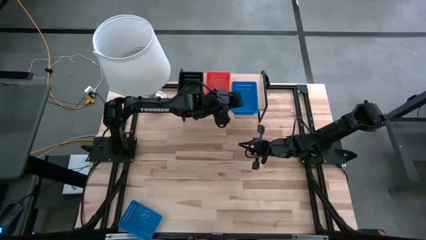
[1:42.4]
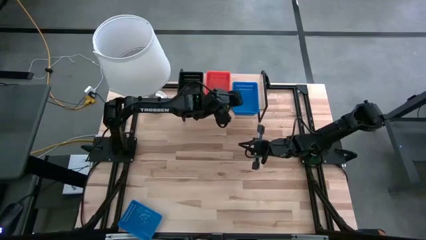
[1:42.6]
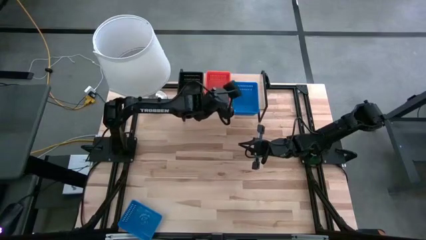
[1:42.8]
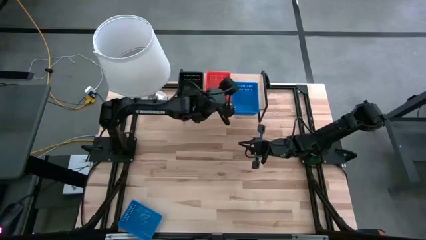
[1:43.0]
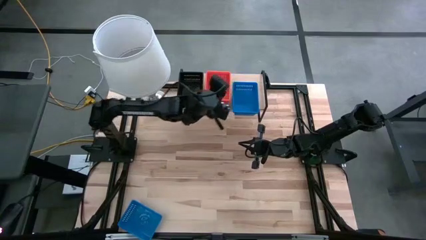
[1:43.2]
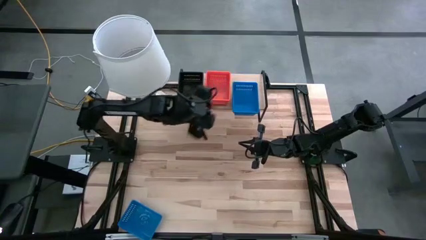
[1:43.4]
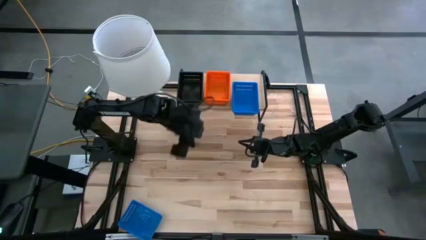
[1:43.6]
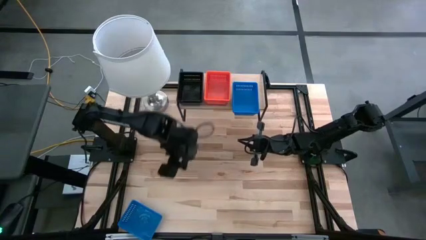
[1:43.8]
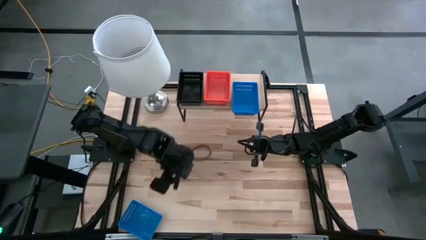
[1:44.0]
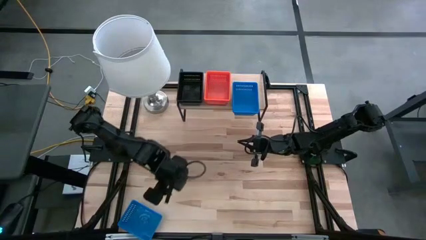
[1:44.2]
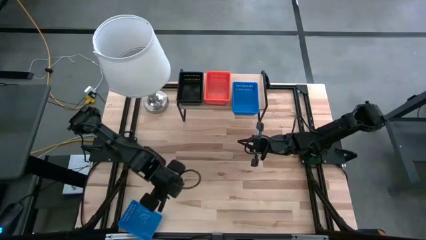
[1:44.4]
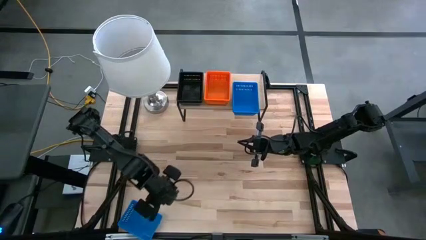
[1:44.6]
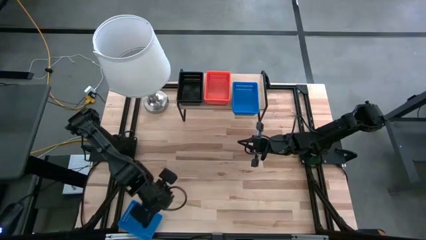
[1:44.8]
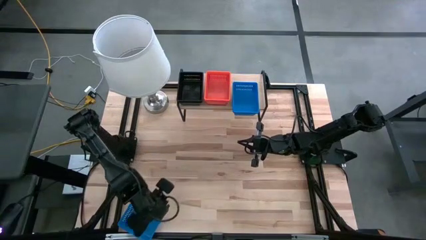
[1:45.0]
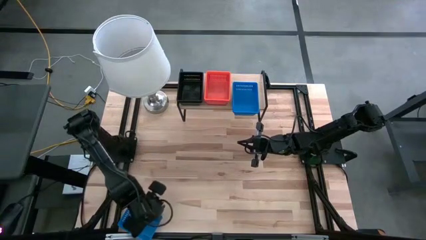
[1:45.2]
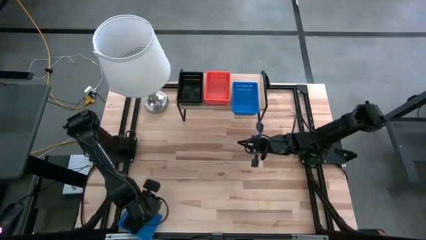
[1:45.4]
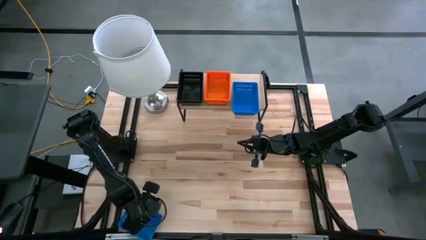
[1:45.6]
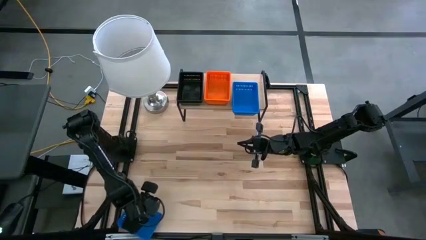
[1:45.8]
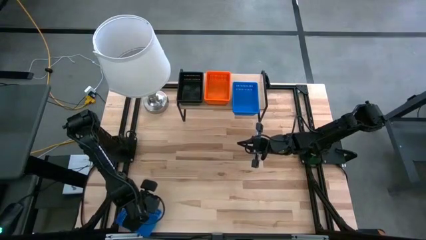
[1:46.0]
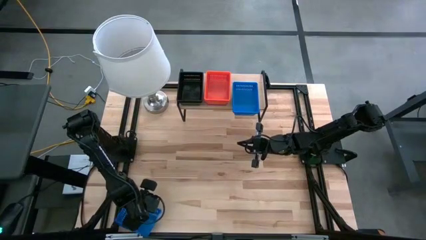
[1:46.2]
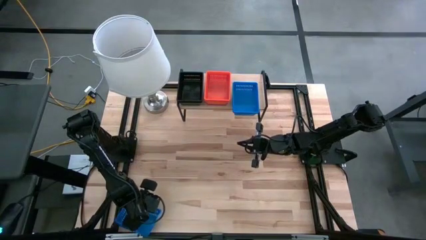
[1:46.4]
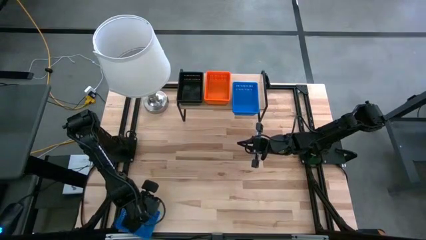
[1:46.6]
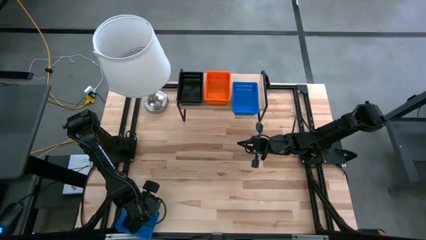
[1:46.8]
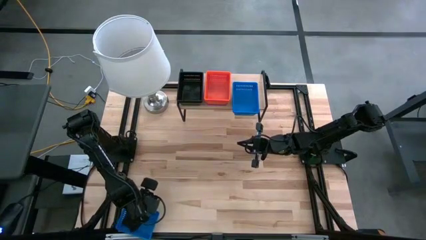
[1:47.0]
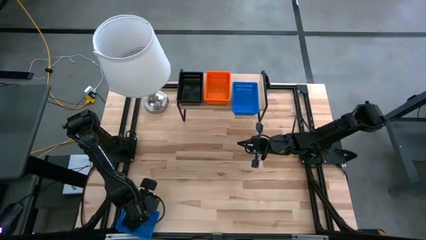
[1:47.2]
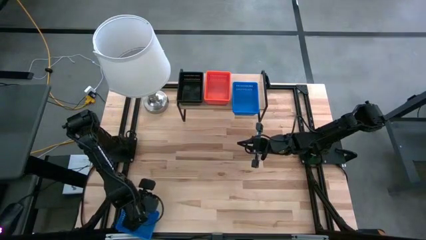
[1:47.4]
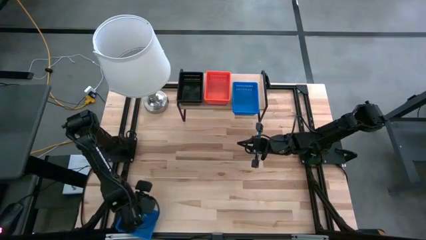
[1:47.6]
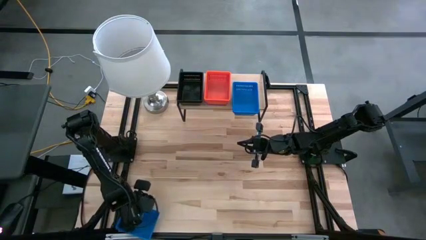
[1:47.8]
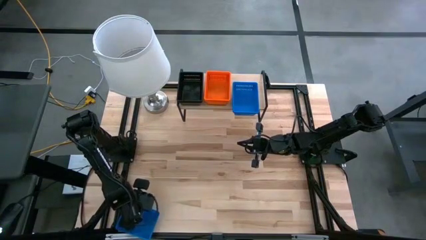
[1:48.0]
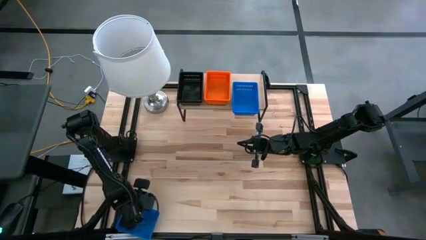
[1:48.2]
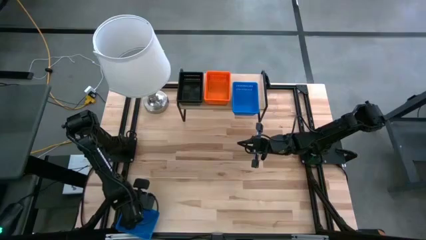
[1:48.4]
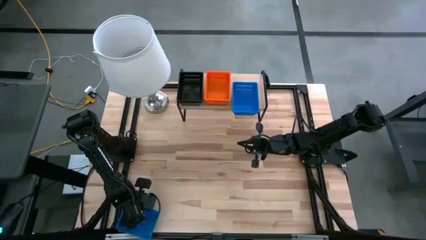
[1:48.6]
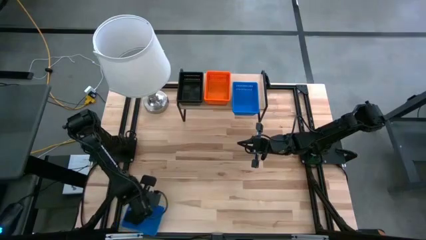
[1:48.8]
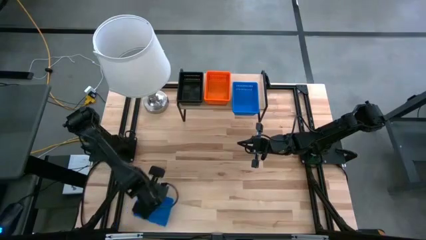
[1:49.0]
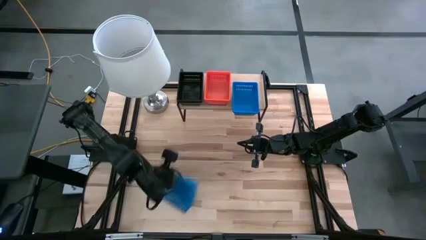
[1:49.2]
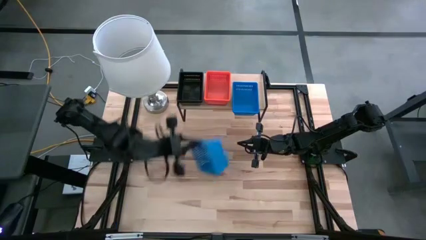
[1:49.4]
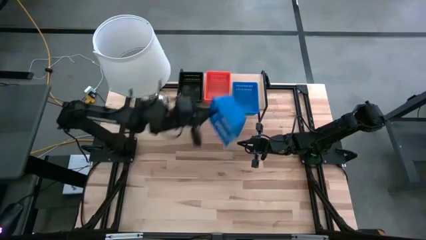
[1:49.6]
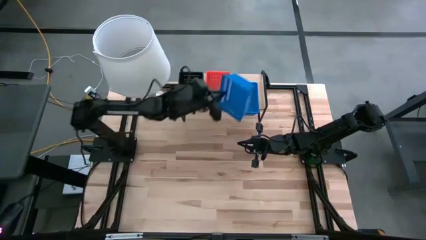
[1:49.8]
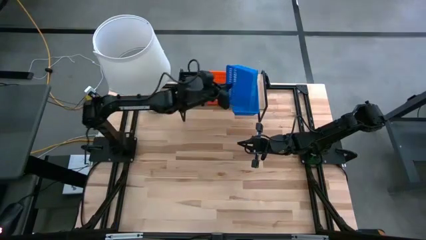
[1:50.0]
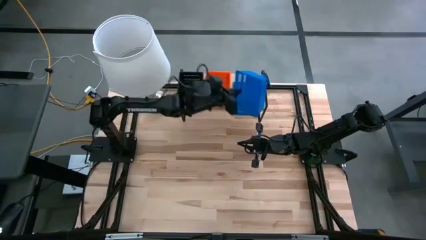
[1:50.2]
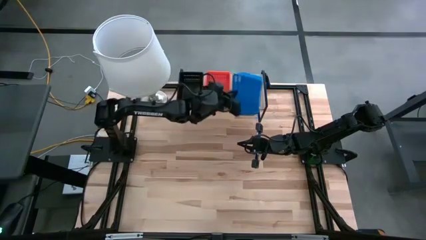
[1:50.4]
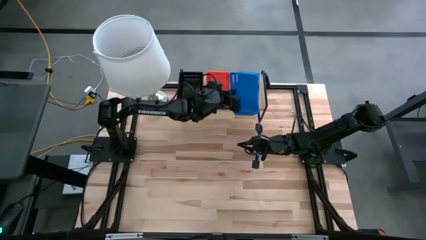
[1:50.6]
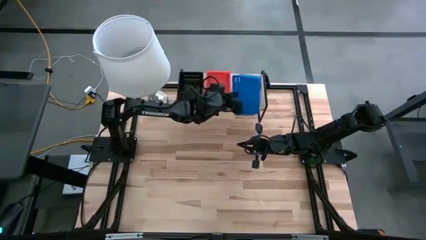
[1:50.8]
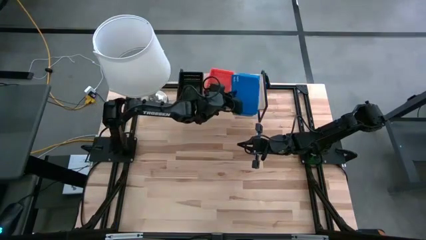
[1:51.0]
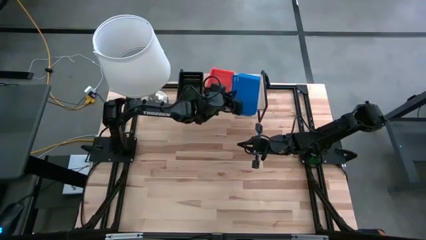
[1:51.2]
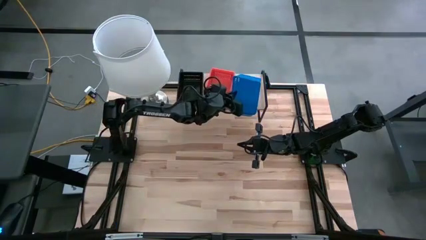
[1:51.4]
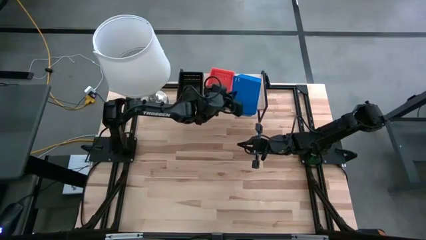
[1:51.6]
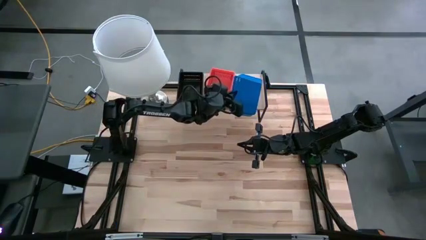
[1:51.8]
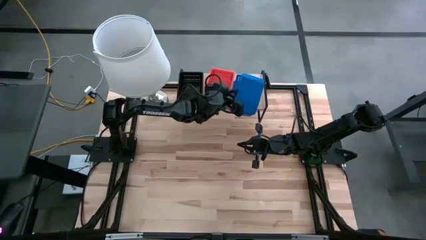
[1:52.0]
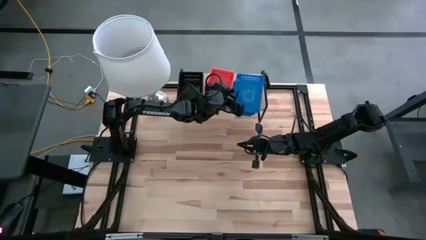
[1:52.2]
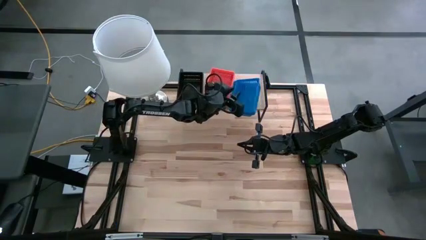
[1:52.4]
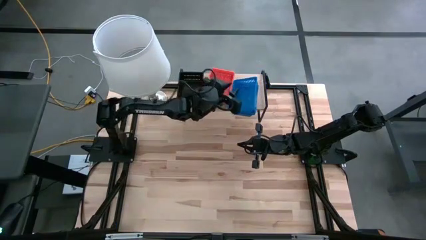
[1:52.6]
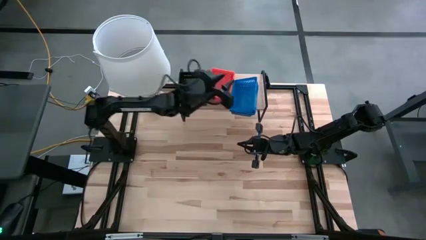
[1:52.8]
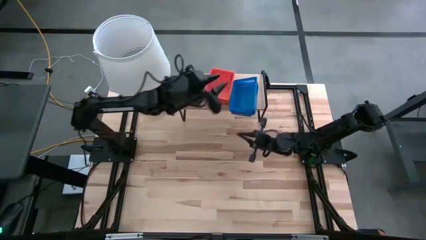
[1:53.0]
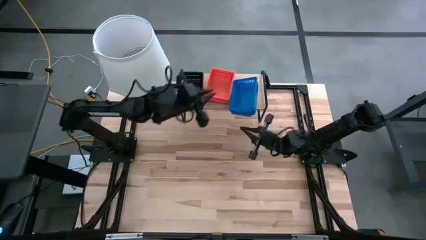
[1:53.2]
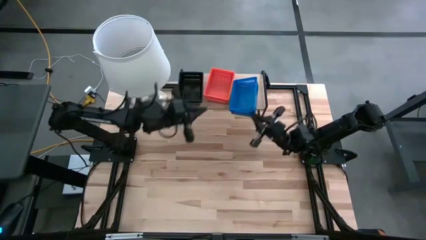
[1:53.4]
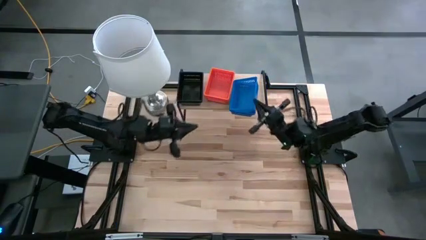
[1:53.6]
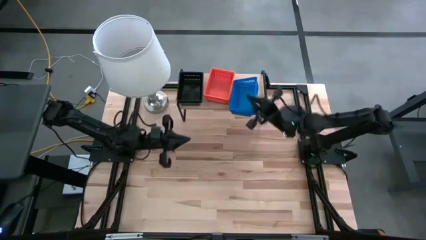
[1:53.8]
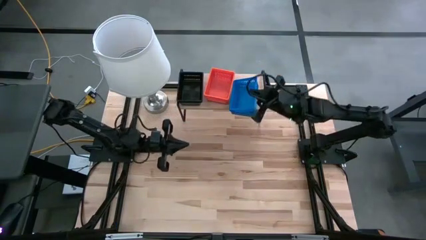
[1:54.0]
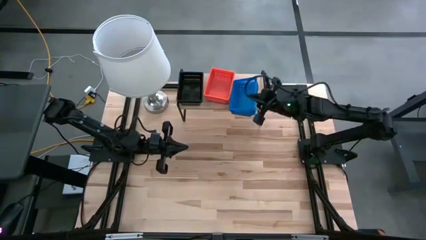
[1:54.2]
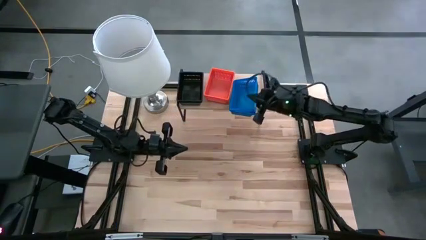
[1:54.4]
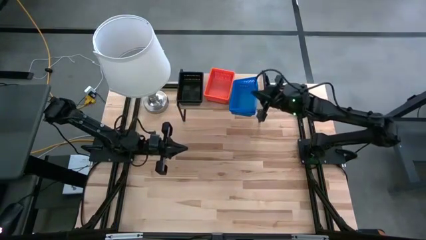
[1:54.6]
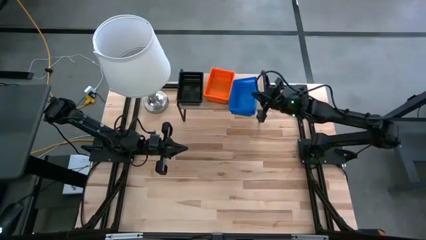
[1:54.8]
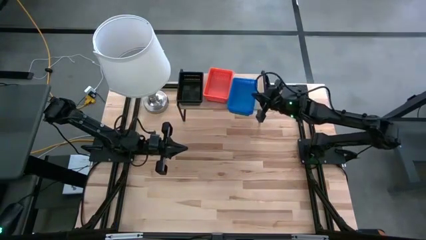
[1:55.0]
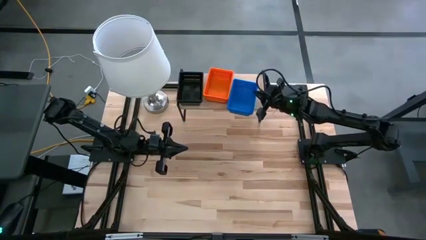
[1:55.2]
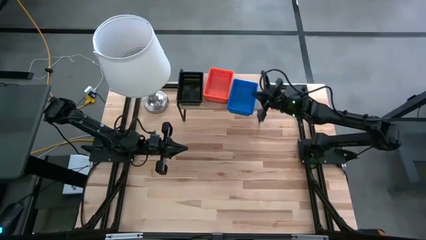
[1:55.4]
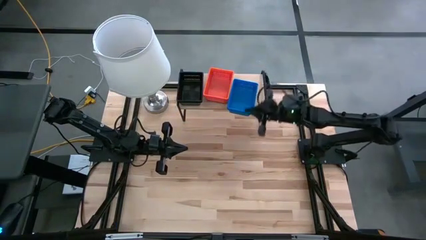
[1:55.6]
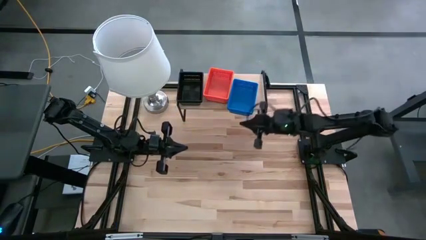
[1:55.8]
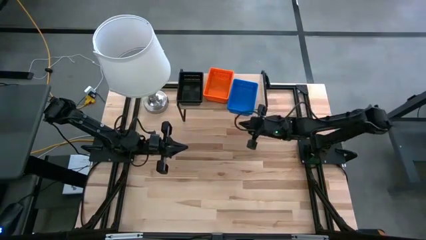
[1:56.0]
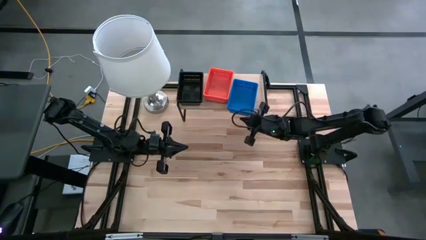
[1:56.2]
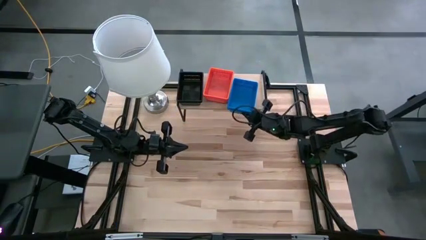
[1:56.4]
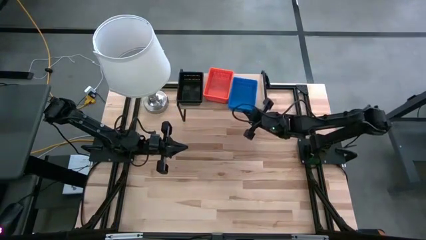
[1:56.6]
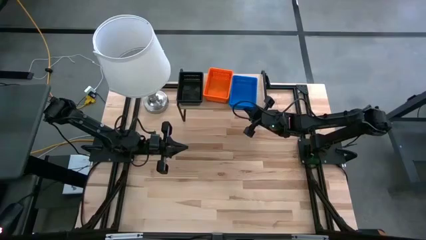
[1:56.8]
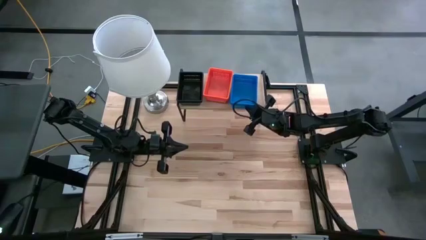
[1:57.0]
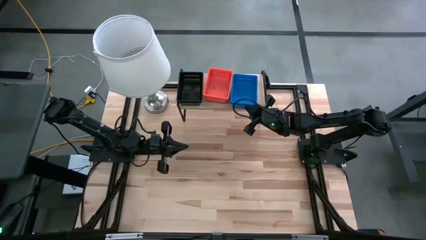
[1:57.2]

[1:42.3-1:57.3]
Task: Stack baskets on shelf by color
Stack the blue bin on top of the blue bin on the shelf

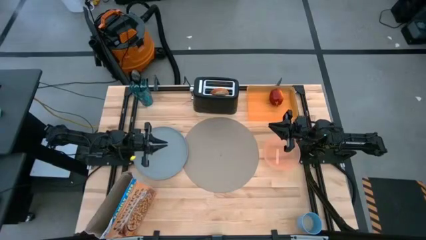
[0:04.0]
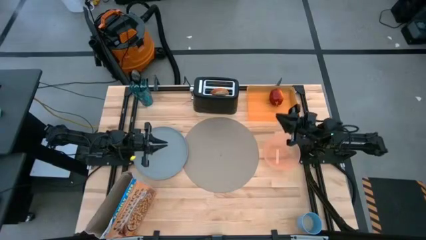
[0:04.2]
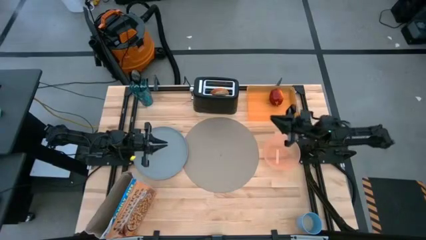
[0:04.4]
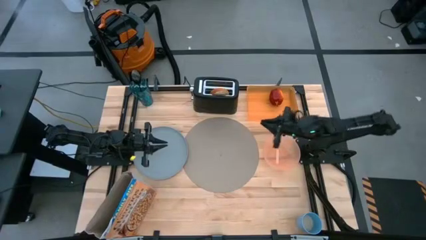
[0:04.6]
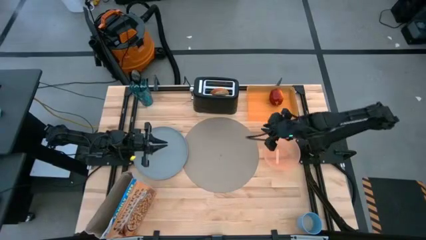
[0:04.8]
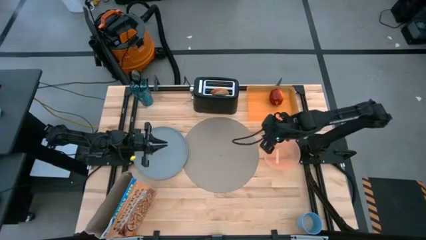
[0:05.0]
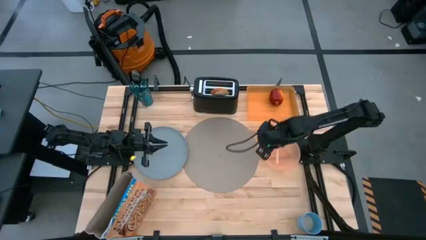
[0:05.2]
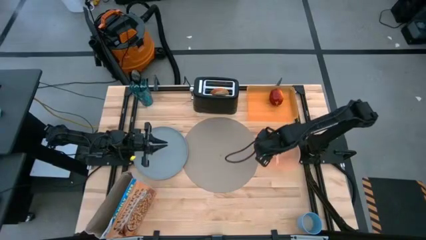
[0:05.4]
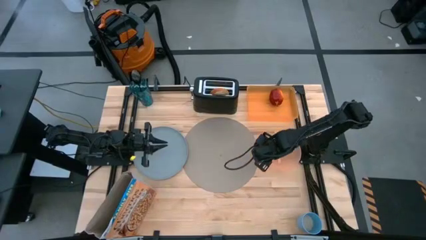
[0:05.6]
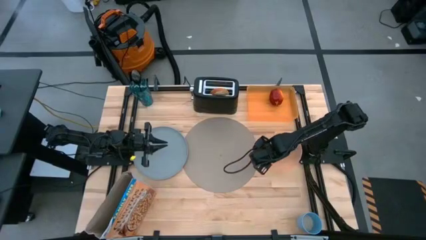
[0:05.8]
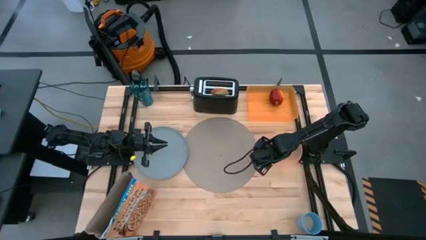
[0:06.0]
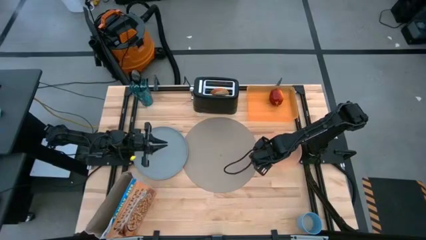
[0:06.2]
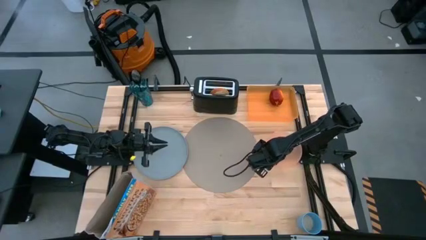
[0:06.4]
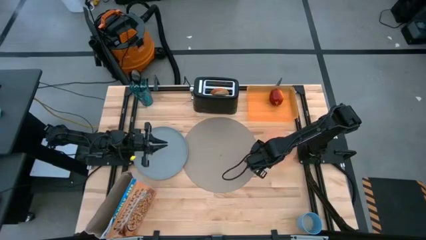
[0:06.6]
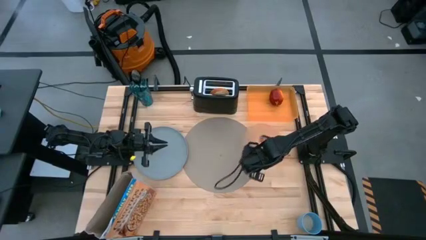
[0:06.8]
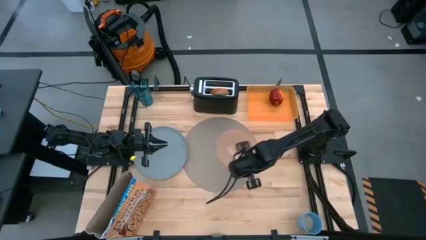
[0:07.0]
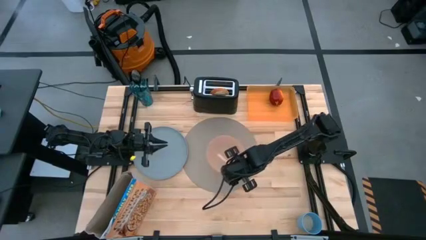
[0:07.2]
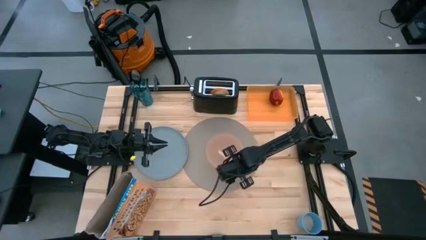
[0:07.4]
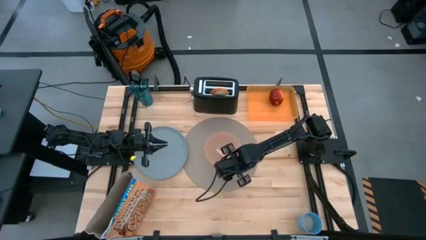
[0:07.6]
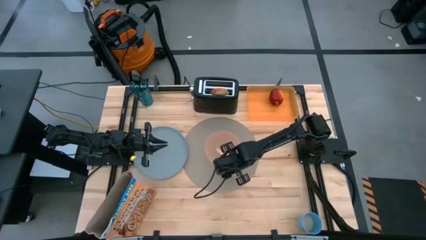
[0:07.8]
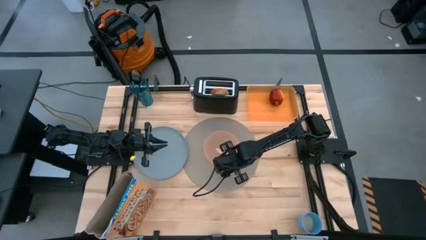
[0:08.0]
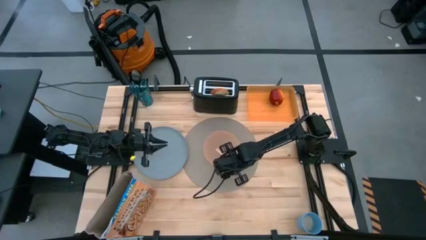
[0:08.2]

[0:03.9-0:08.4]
Task: Arrange a breakfast setting
Put the orange bowl on the gray placemat
